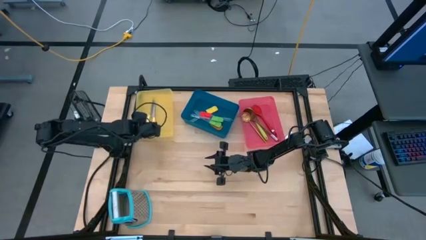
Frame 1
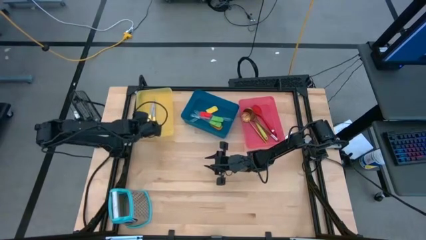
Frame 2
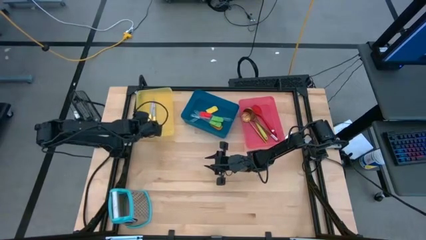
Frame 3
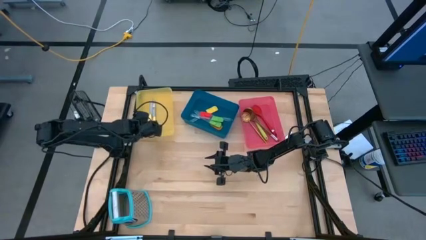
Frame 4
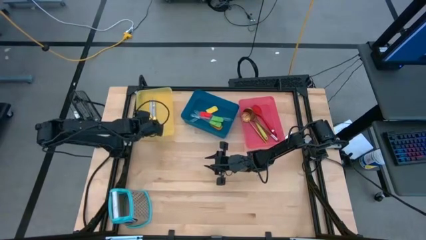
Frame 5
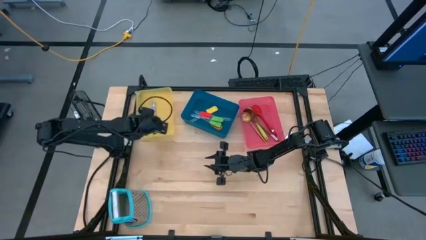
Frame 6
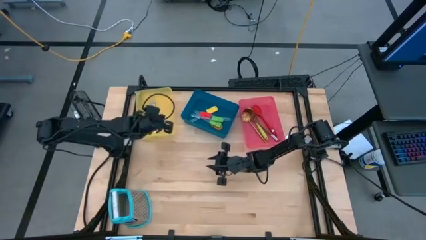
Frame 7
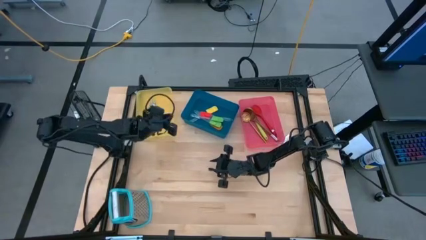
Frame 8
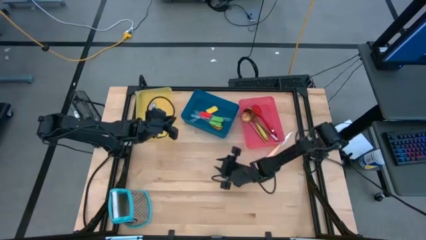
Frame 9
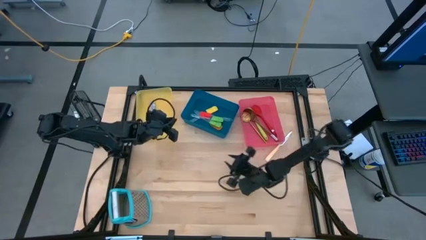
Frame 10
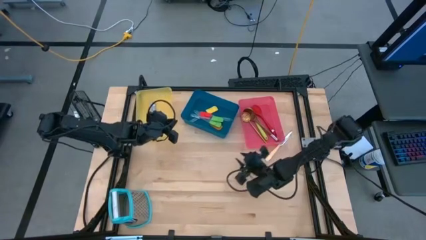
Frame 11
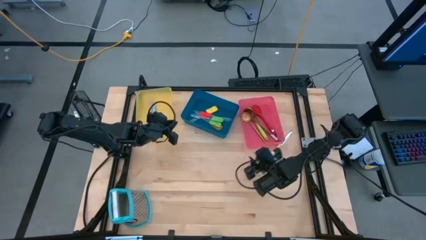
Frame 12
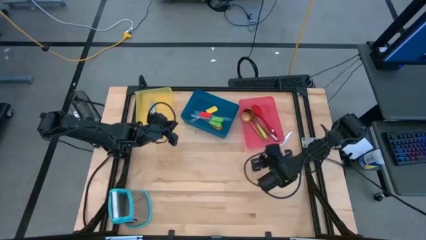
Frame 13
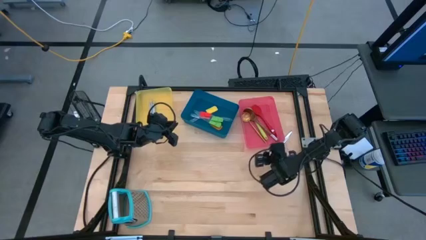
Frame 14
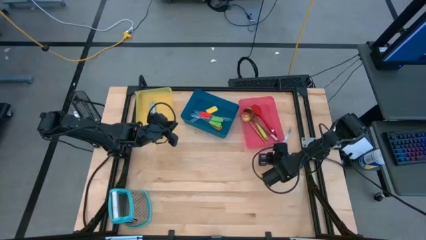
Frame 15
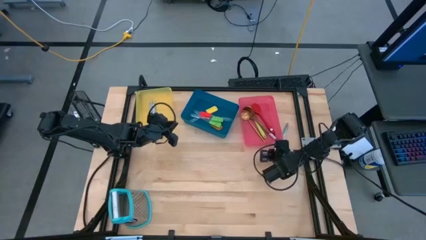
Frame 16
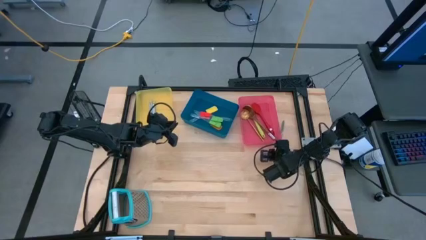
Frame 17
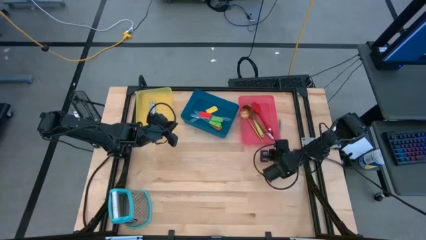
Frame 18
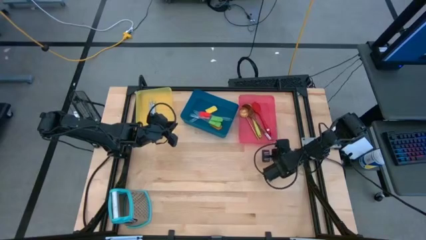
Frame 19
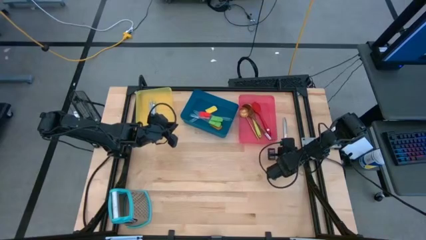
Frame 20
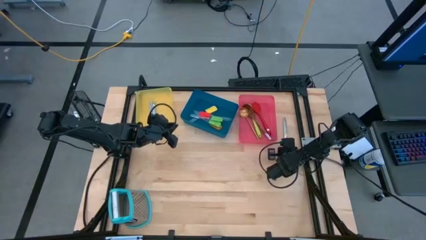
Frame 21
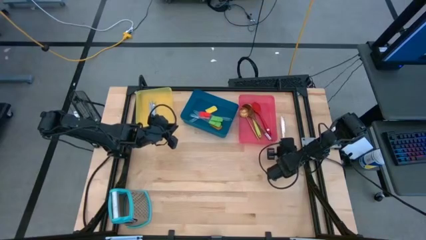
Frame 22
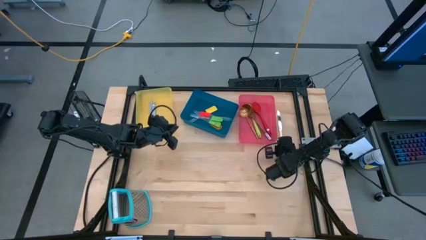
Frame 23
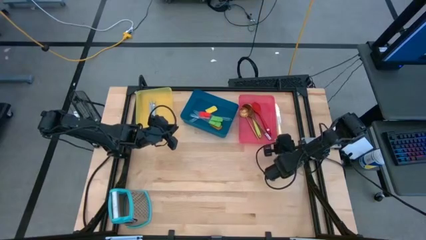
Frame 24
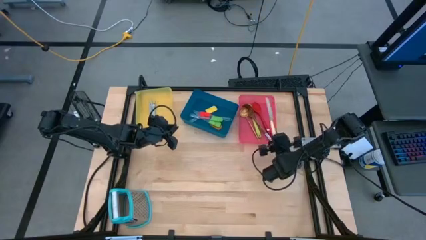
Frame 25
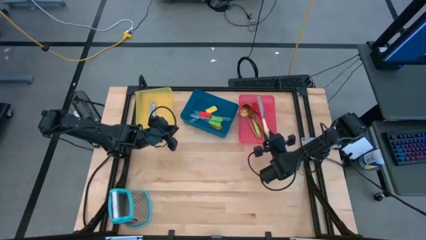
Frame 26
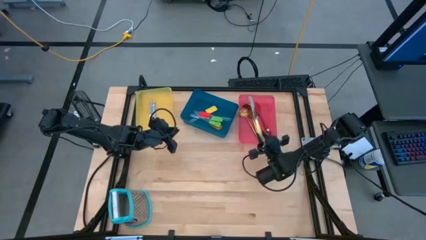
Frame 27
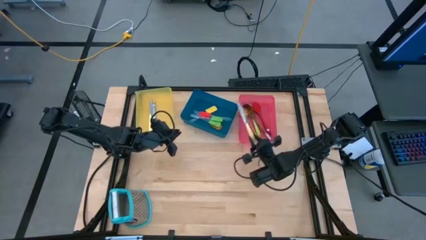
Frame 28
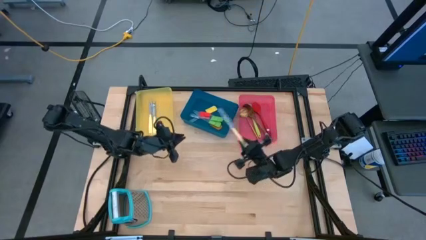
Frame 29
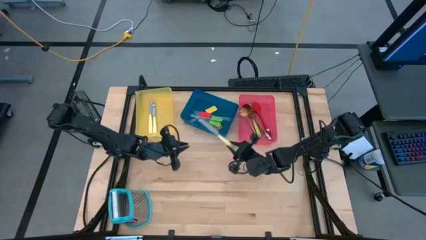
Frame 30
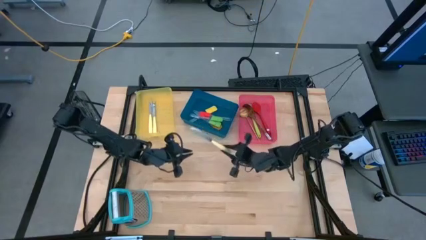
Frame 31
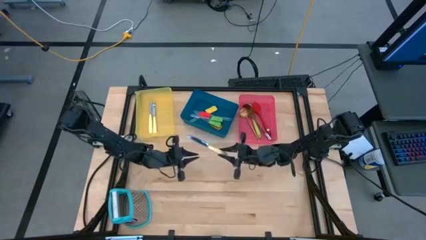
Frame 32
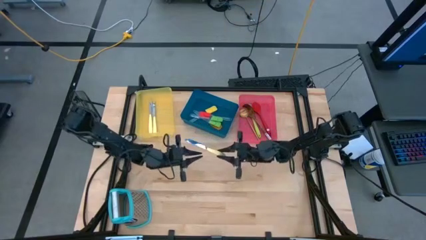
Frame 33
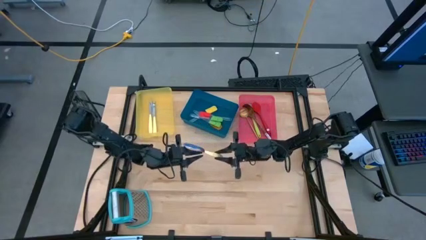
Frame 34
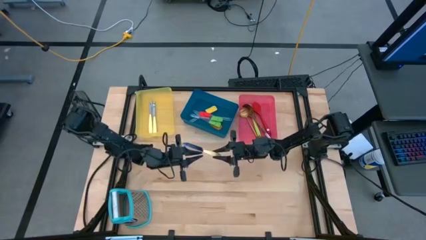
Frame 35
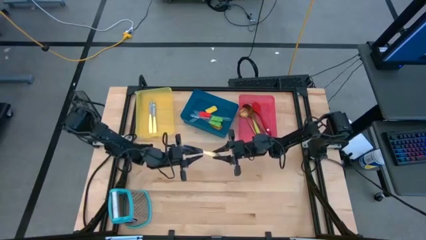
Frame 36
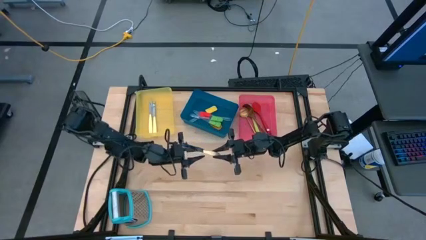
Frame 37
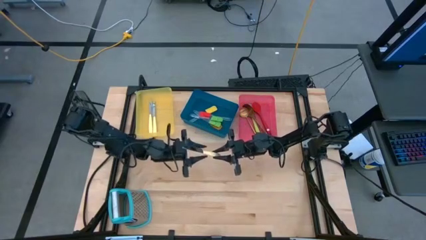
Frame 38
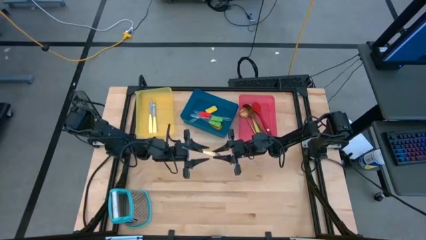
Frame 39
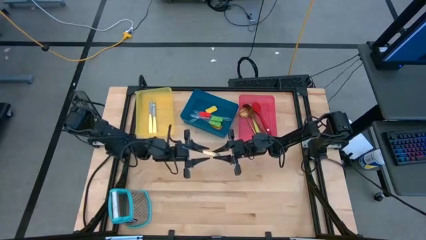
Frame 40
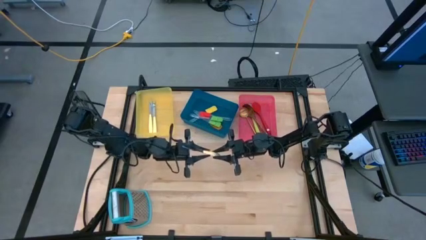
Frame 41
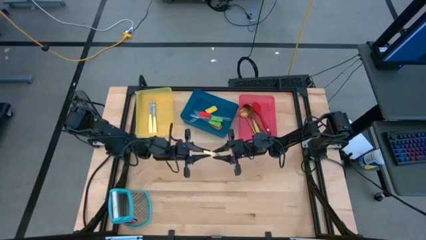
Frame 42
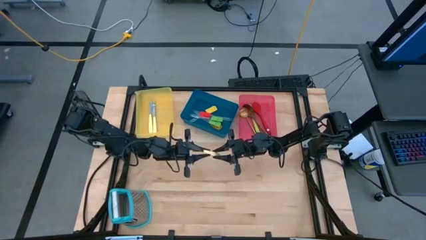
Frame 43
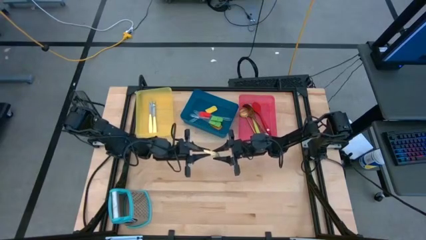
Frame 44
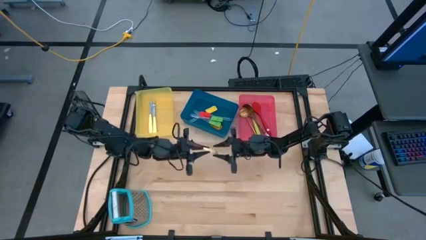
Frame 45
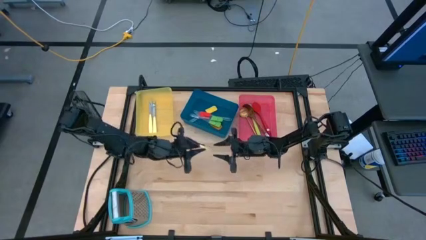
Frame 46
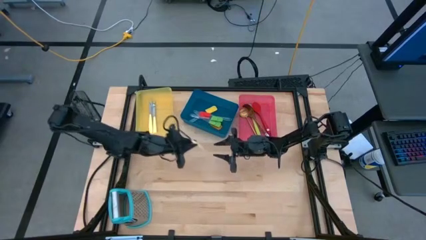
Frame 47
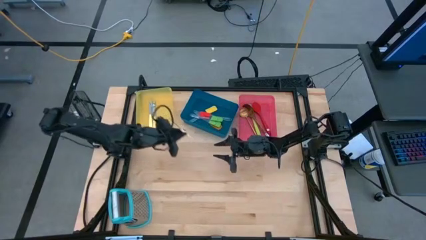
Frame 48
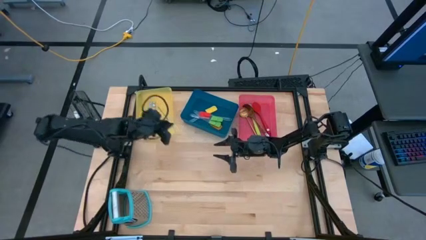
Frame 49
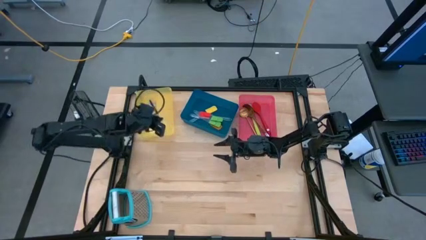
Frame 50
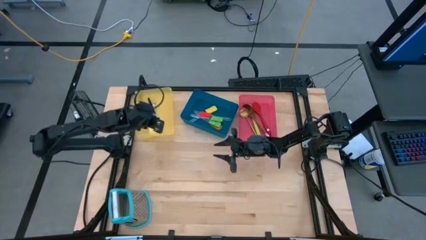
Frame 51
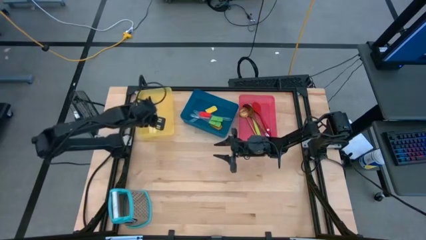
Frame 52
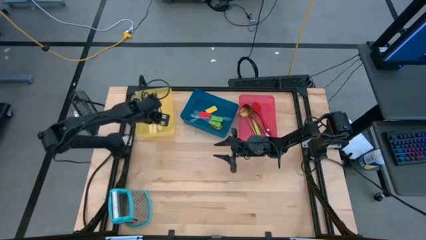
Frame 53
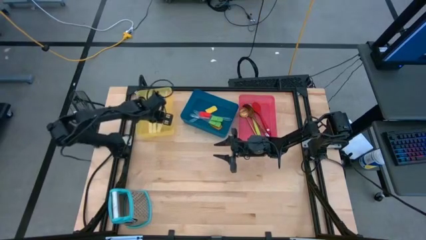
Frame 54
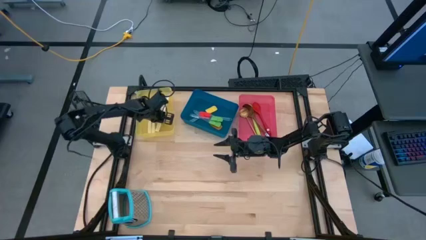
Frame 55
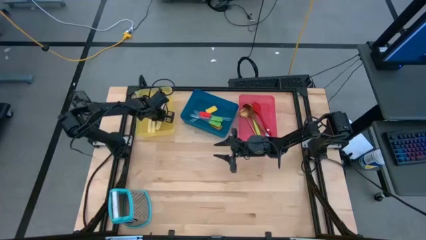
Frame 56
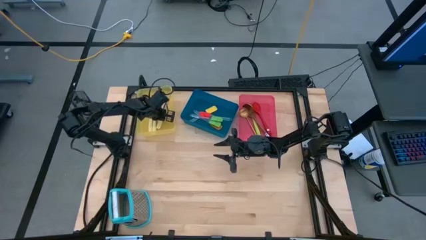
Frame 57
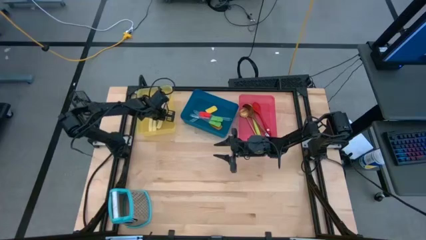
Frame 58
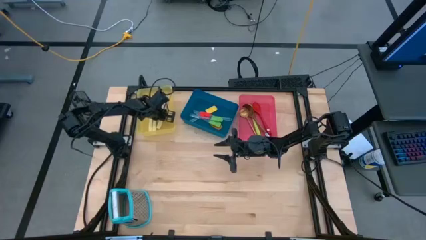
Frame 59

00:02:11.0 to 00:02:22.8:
Task: Pick & Place Kitchen Items
Put the light yellow knife into the yellow bin

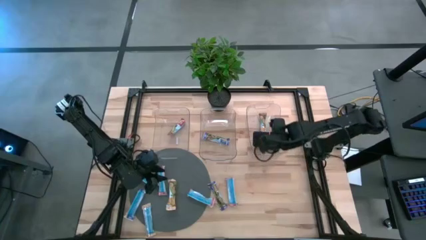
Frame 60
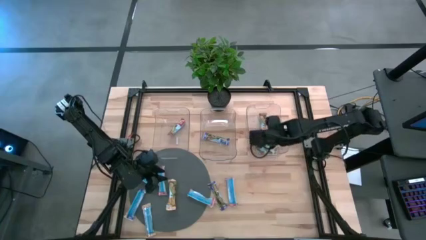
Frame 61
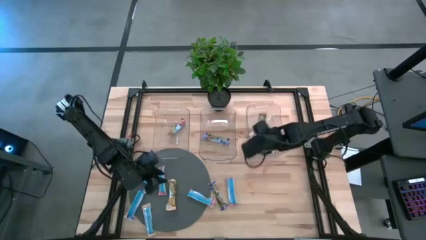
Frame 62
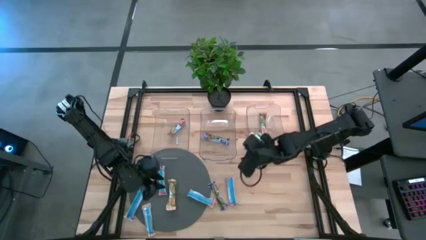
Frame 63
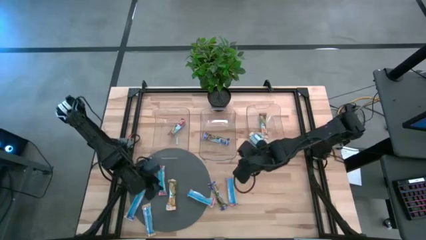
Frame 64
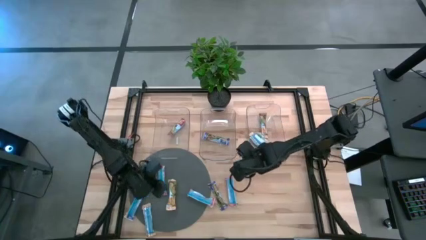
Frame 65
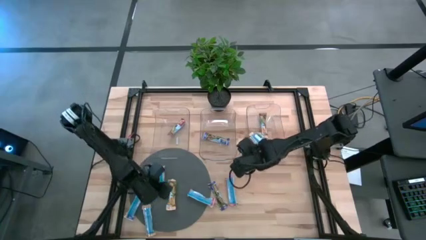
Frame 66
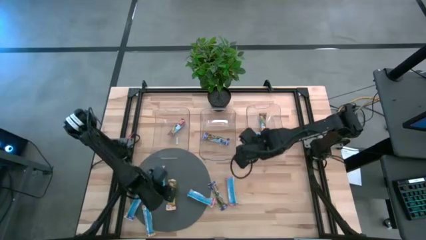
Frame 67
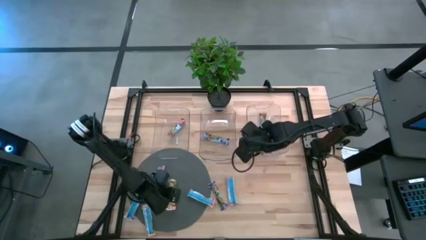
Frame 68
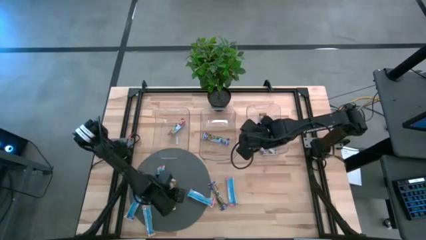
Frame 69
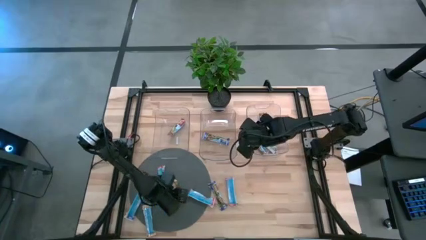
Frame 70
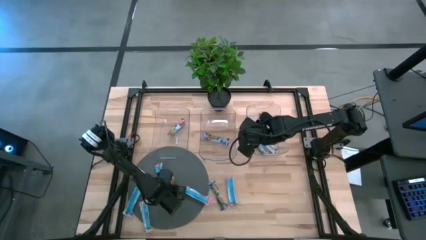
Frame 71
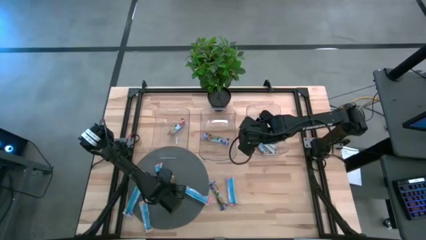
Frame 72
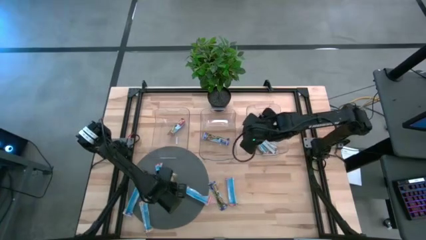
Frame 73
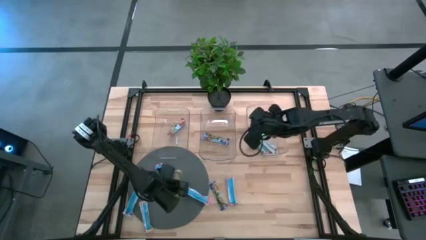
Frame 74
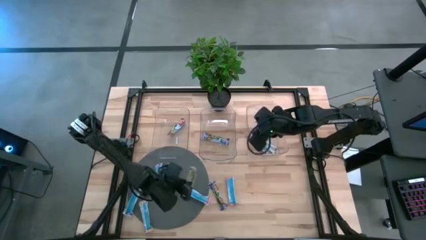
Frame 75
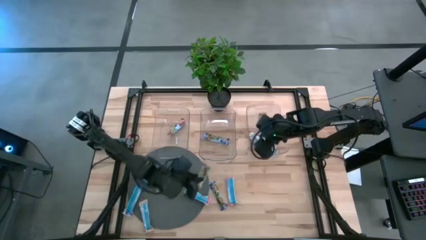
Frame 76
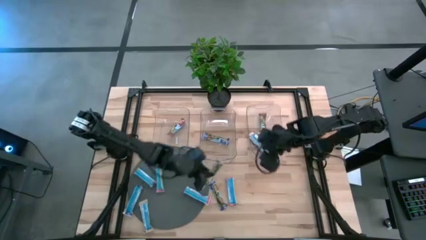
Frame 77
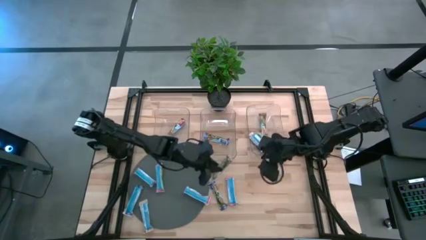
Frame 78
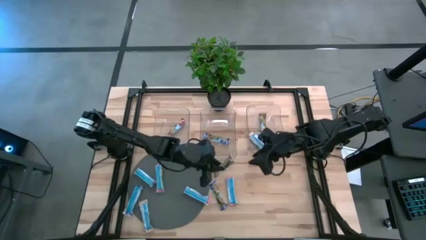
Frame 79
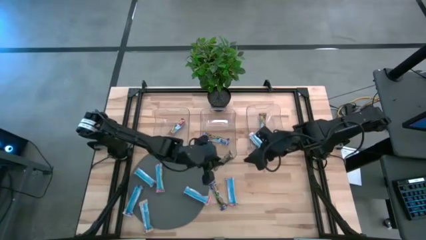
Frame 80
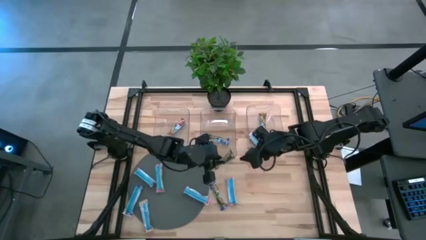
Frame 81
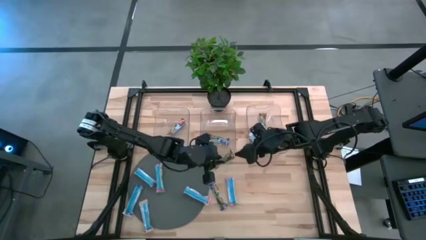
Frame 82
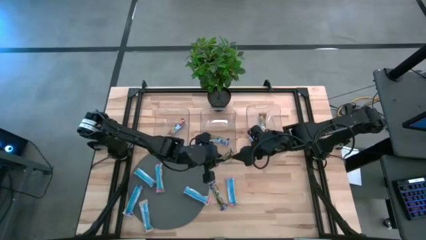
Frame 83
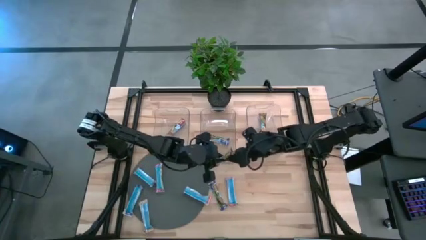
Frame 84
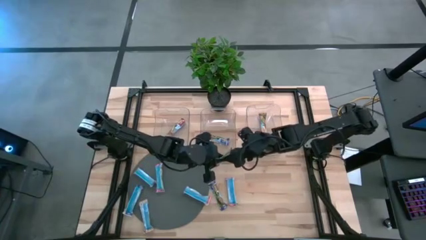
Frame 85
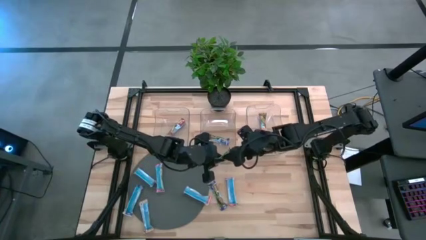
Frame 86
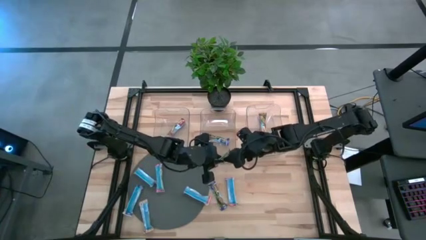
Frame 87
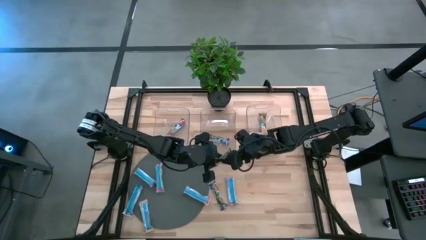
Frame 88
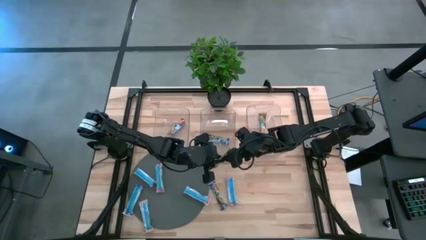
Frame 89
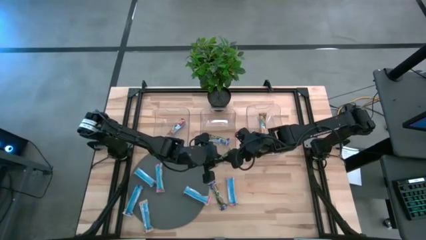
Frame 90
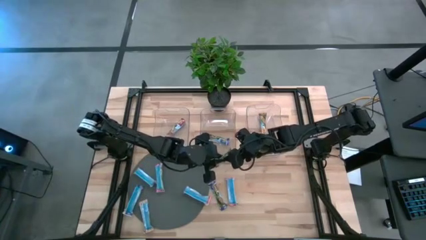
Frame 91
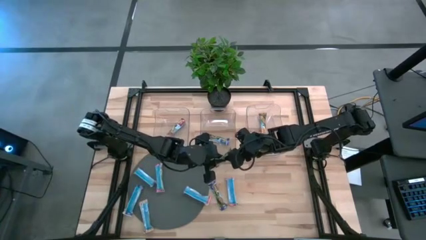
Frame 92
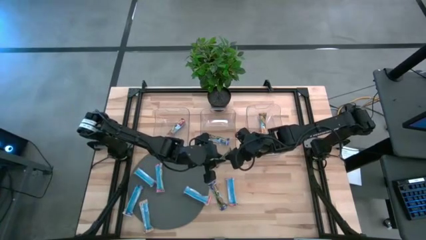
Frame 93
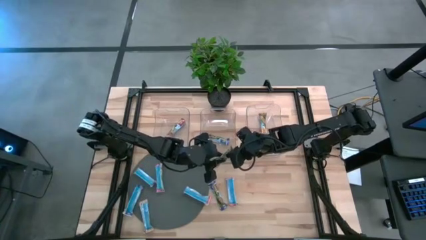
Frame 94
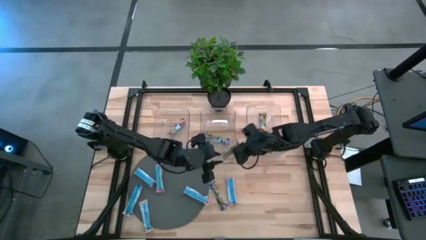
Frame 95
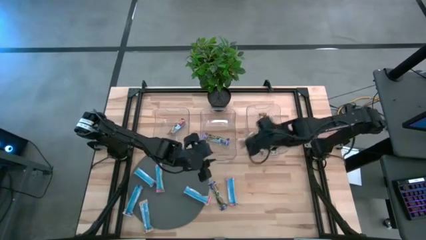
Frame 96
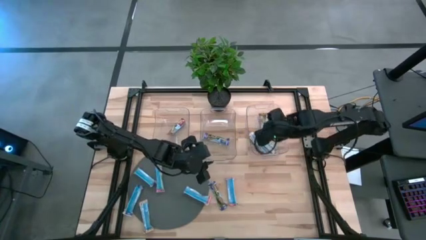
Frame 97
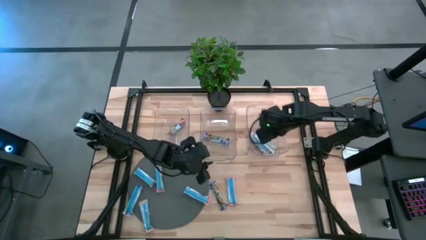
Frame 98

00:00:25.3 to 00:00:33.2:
Task: Pick and place Granola Bars by type
Put the yellow granola bar into the right transparent bin
